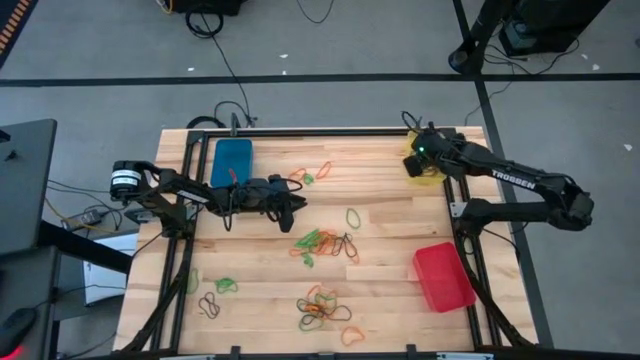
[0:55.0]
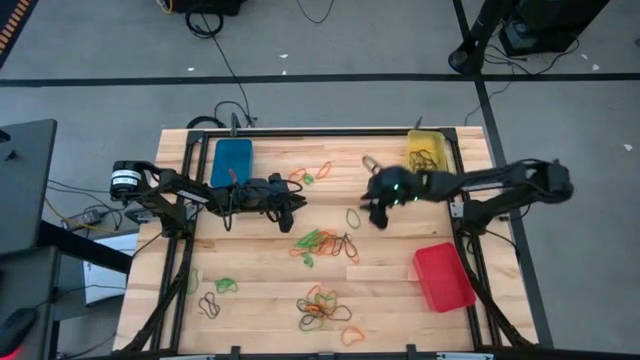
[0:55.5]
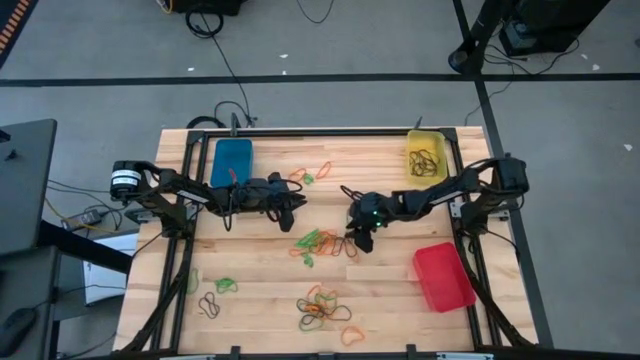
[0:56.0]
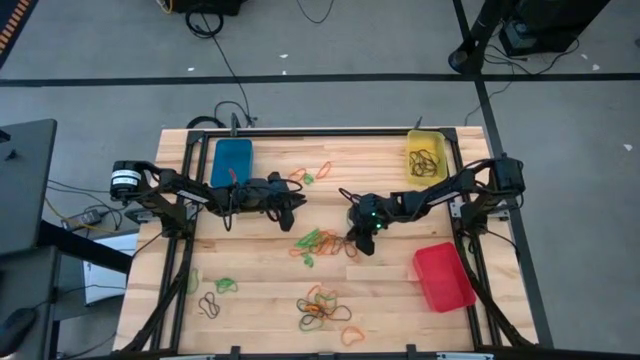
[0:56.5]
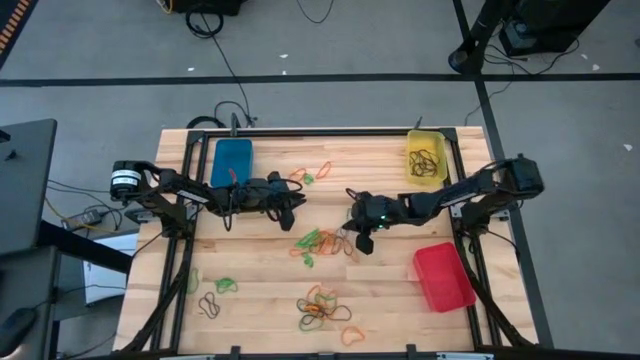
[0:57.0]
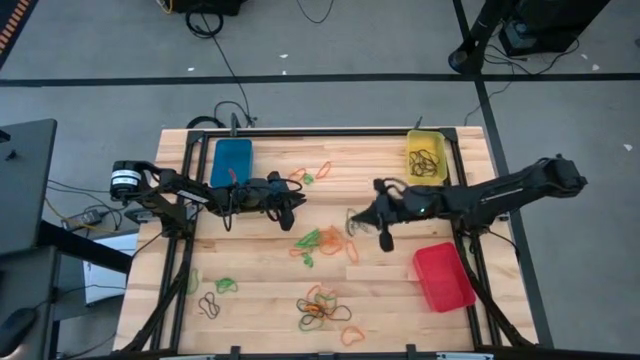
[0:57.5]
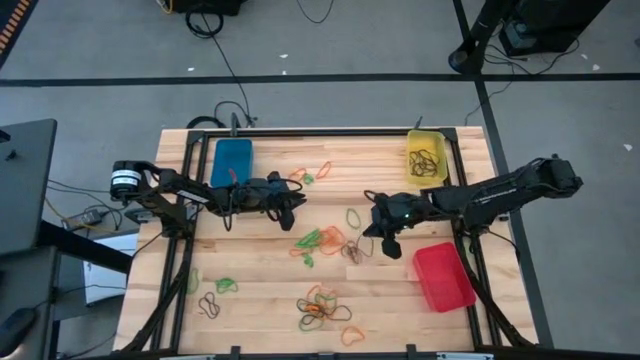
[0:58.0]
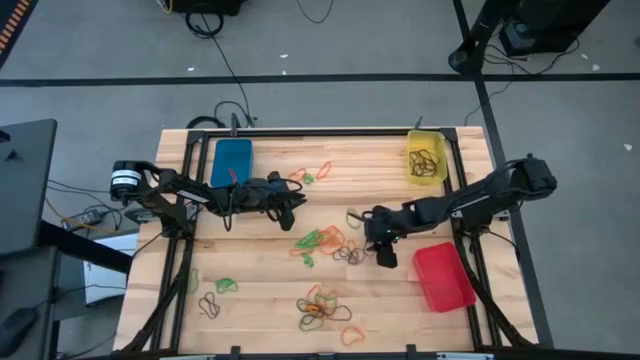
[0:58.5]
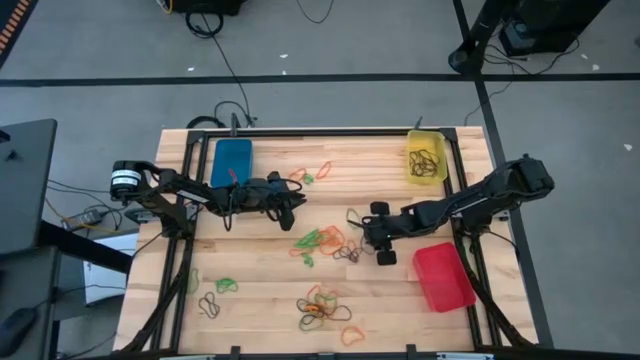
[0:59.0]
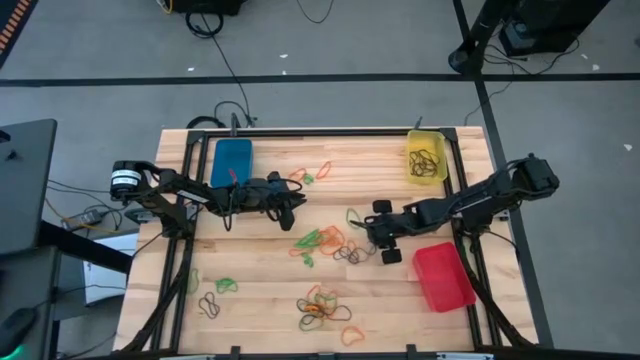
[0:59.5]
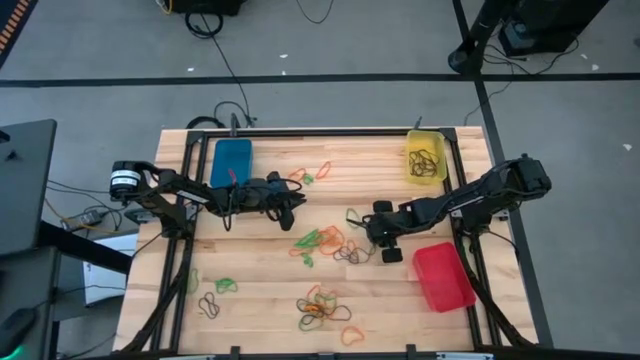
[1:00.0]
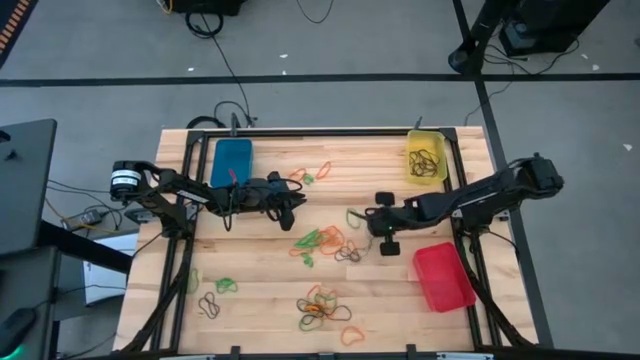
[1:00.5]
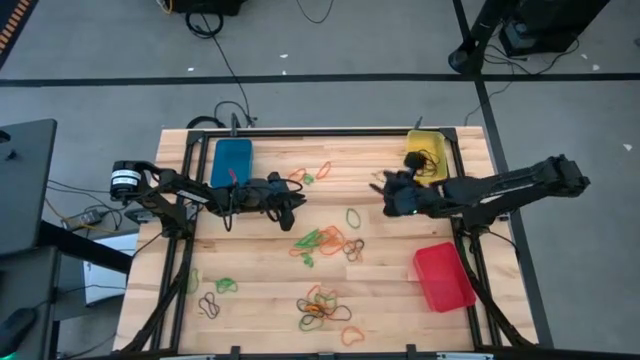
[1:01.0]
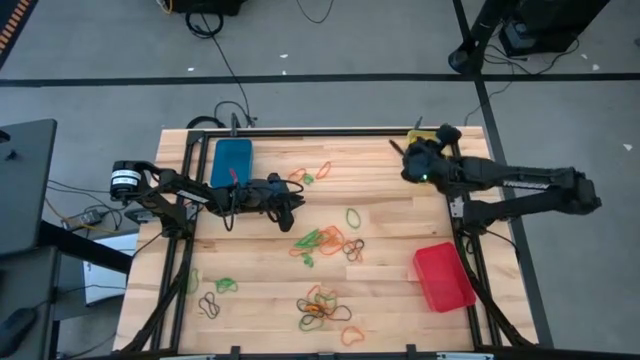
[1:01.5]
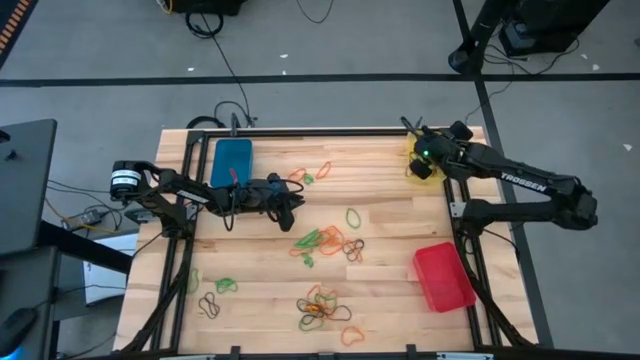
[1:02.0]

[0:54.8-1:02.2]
Task: Sort rubber bands into baskets
Put the brown rubber band into the yellow bin

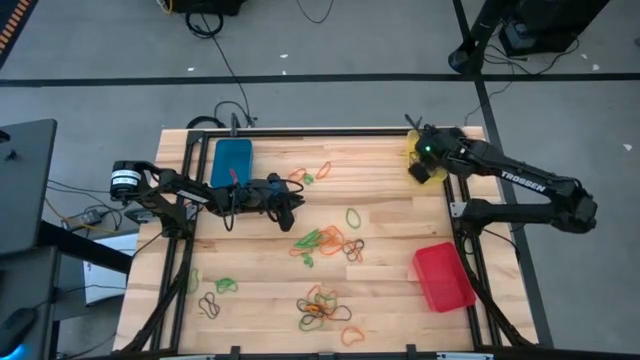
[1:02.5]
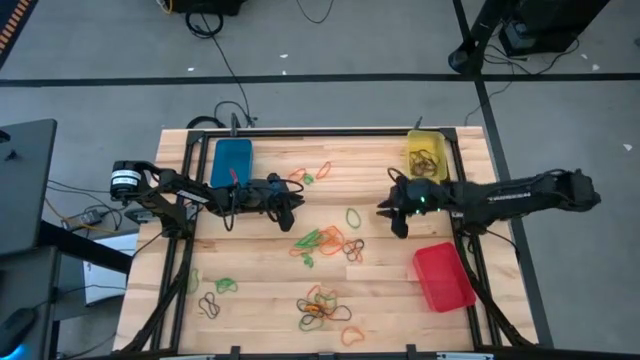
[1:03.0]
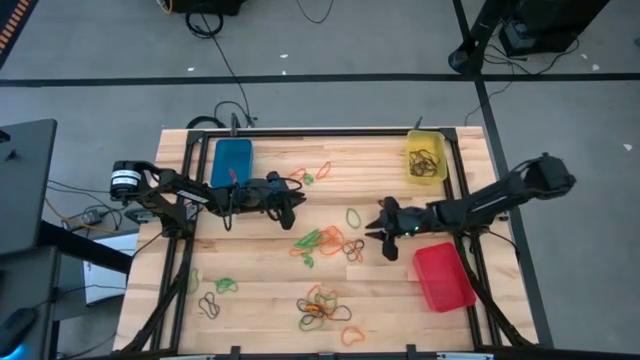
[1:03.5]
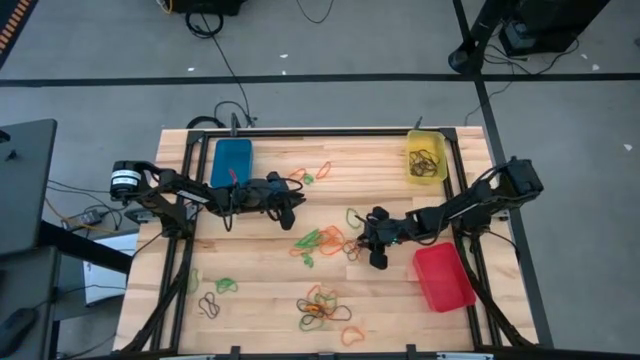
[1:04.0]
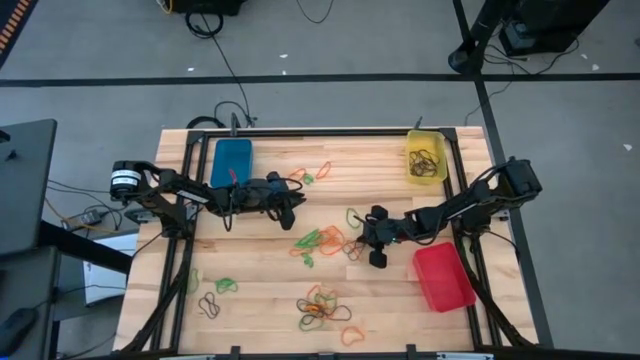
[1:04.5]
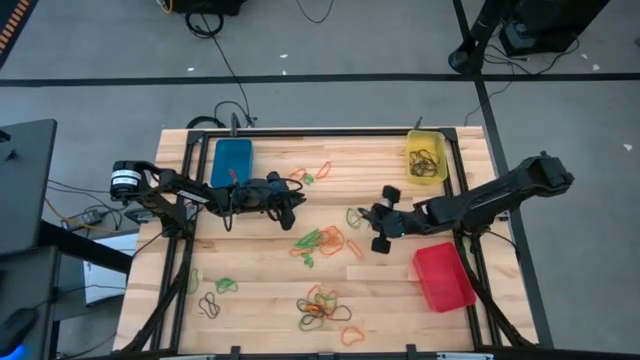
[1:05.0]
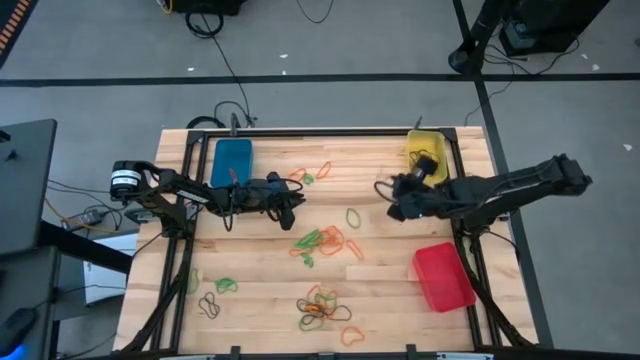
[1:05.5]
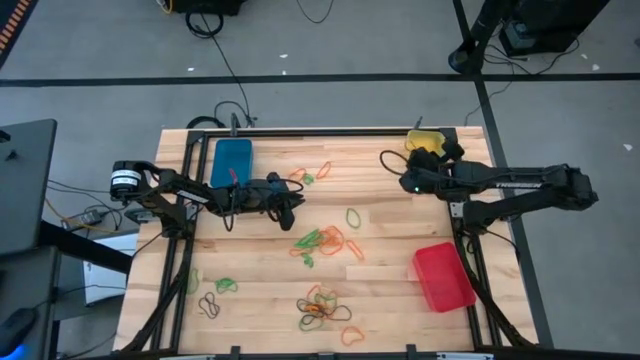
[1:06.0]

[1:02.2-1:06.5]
Put the brown rubber band into the yellow bin

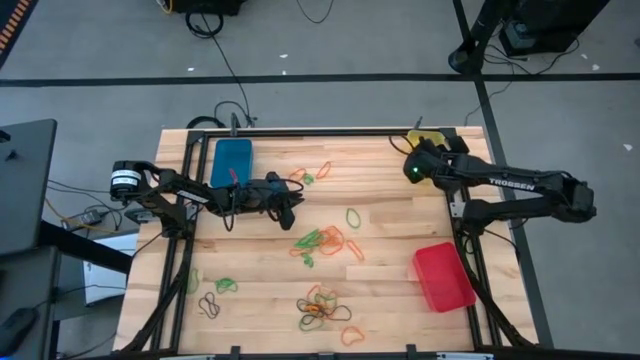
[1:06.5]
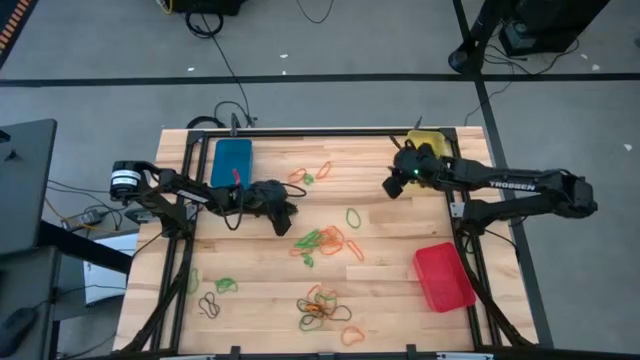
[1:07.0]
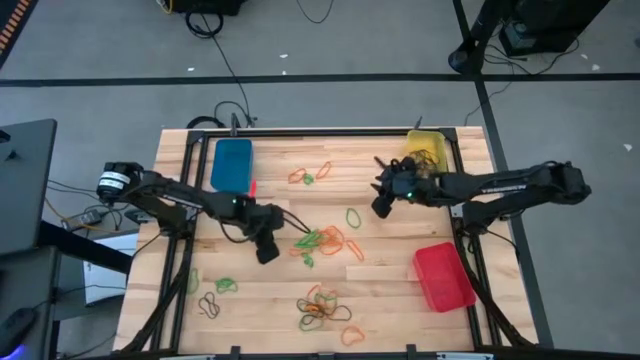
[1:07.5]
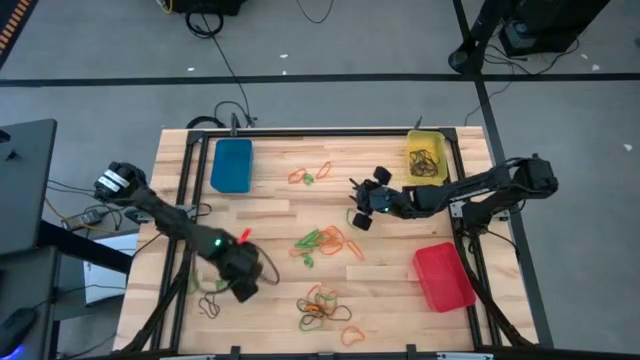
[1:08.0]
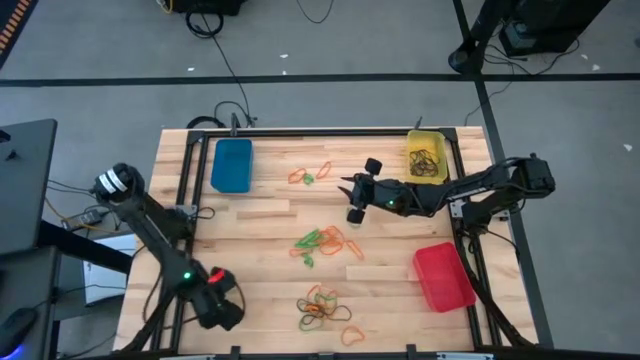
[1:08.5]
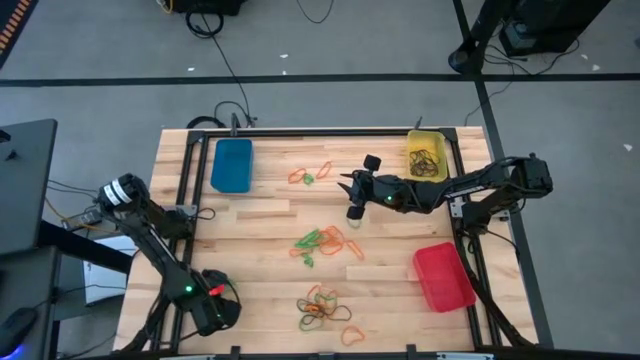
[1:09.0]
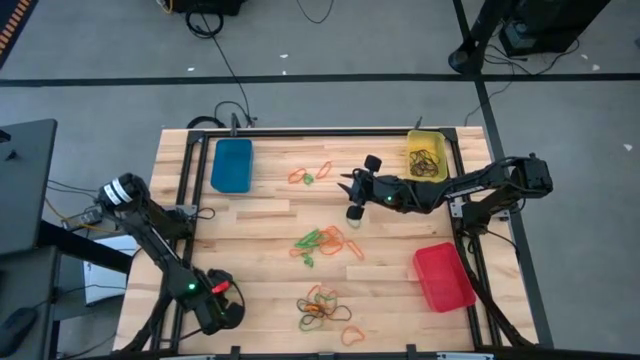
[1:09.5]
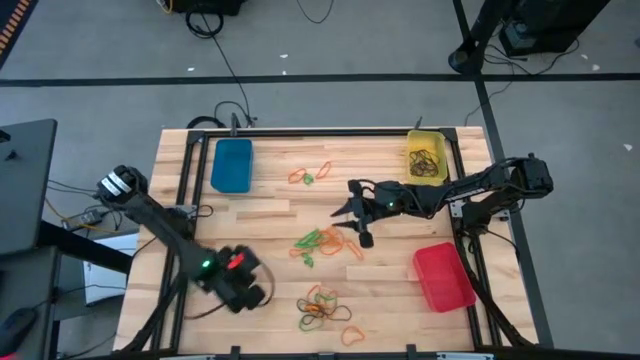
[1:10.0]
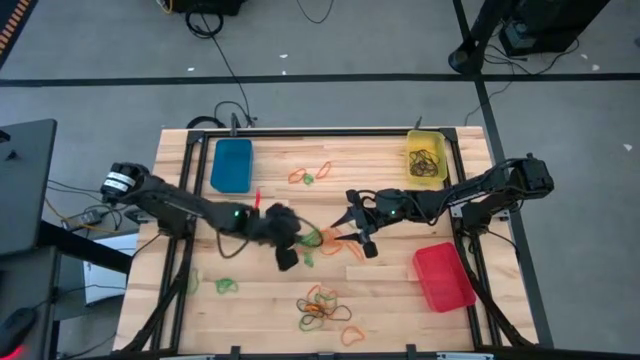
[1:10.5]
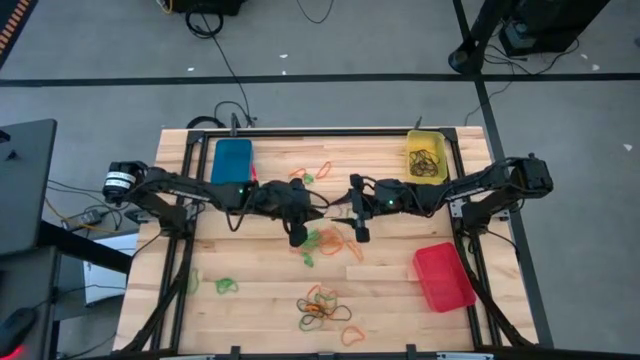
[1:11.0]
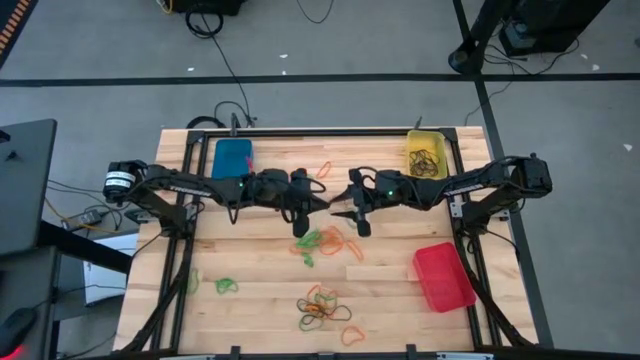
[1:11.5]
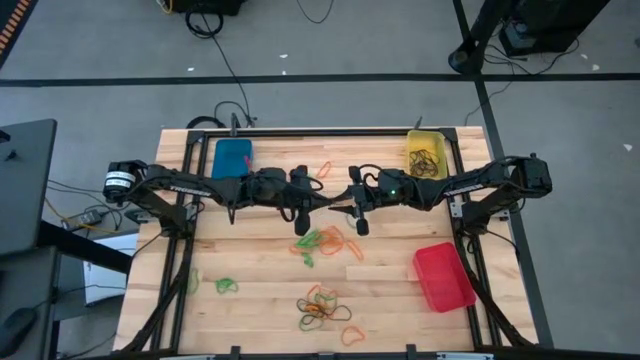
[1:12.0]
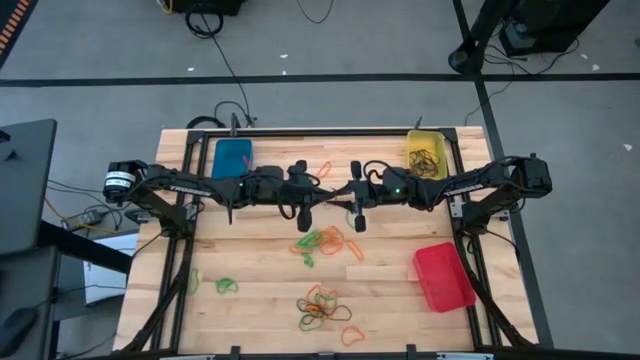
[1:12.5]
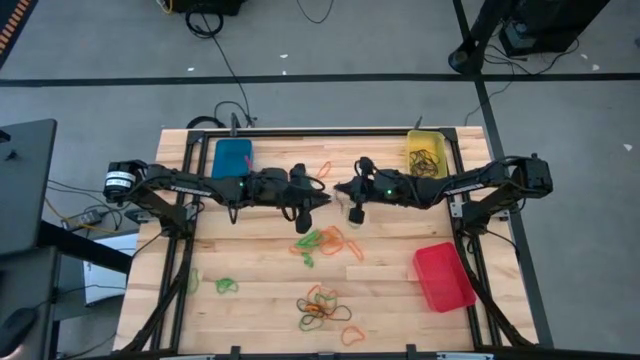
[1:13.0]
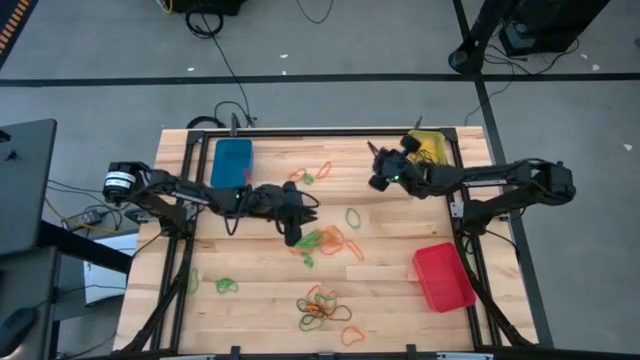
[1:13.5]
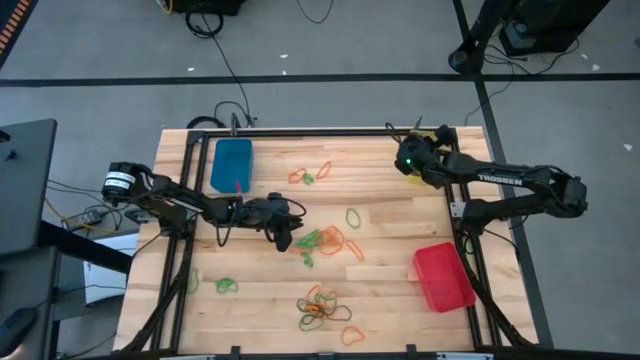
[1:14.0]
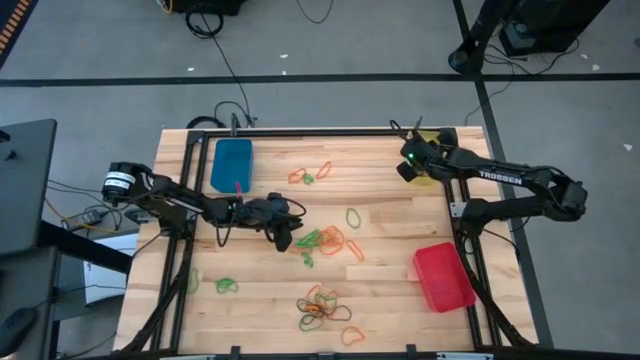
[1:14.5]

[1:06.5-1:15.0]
Put the brown rubber band into the yellow bin

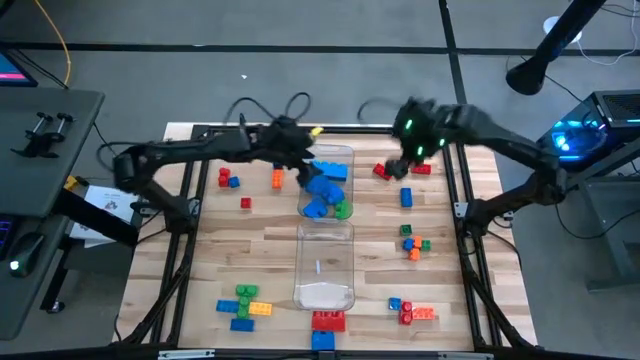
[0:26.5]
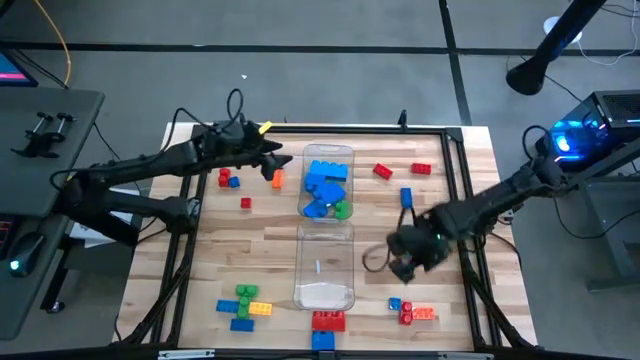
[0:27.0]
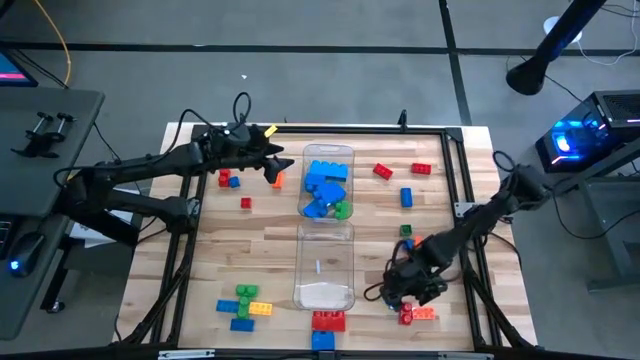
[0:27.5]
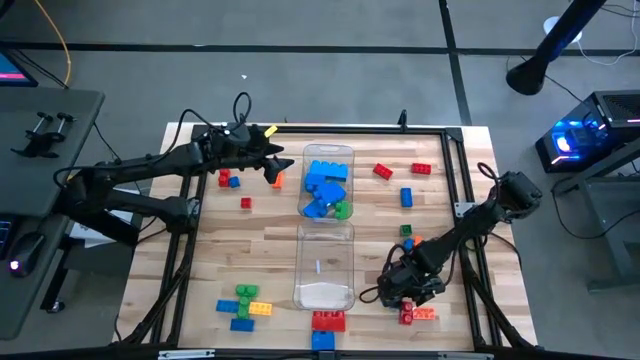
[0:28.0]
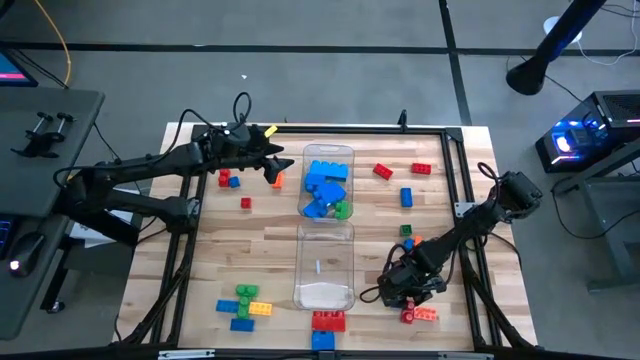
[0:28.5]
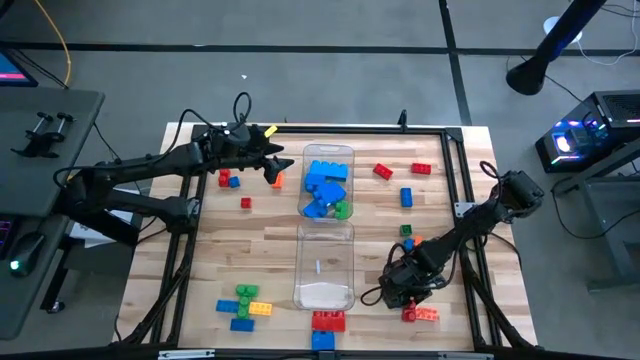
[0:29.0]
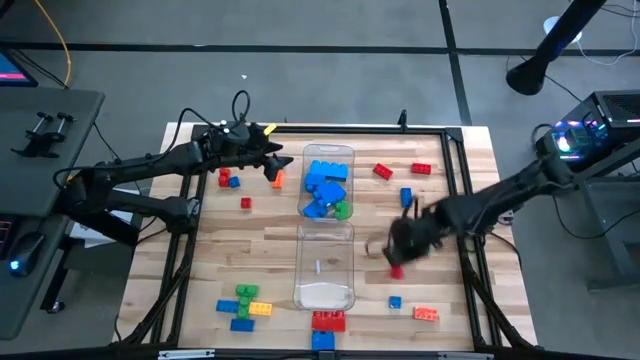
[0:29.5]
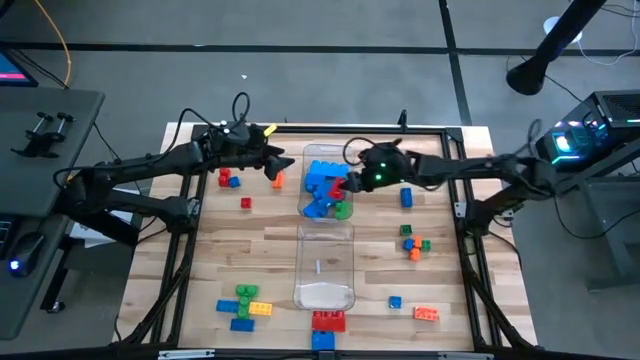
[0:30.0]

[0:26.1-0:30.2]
Task: Sort blocks by size
Put the large red game piece in the top transparent bin
